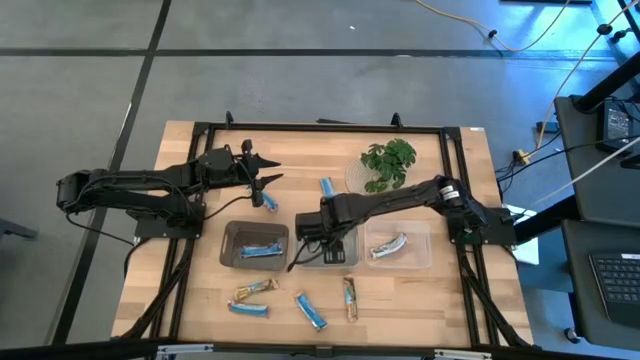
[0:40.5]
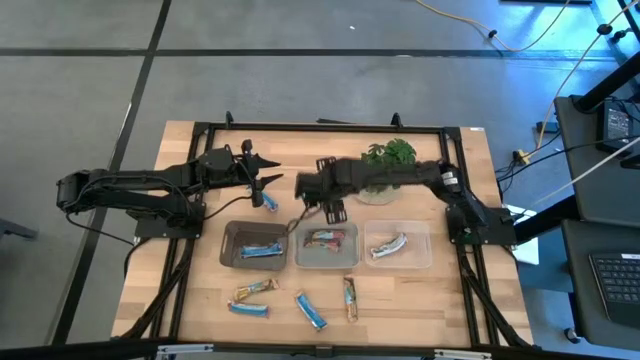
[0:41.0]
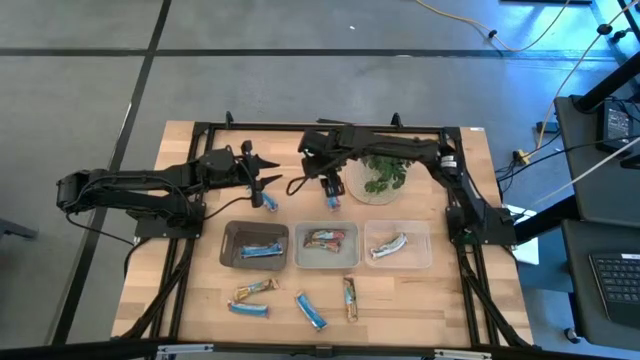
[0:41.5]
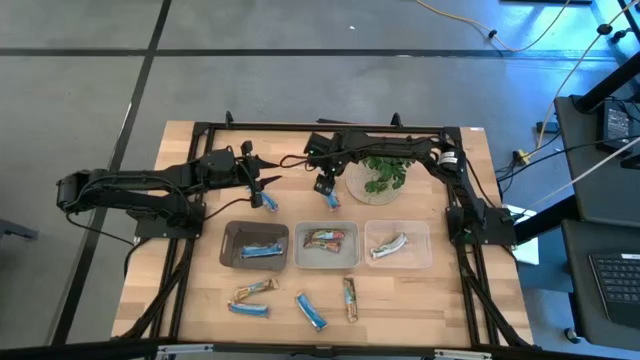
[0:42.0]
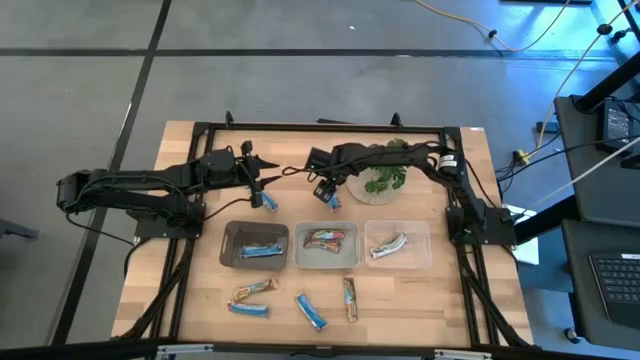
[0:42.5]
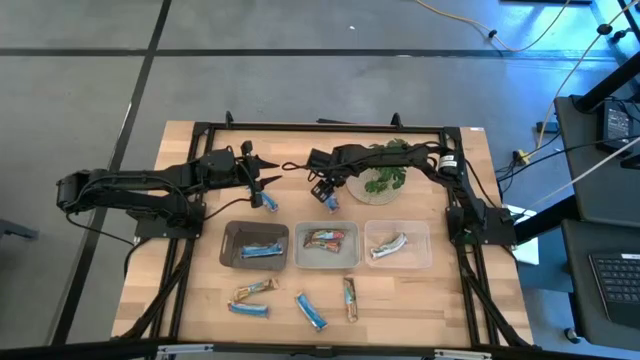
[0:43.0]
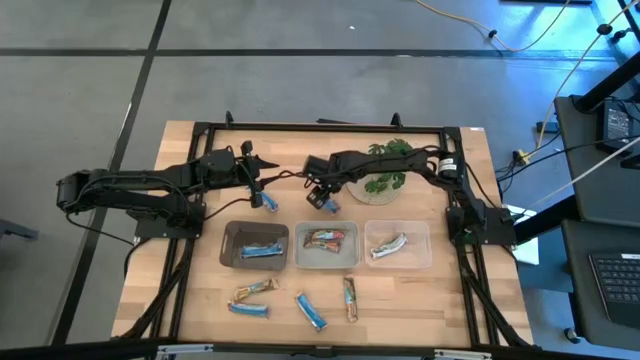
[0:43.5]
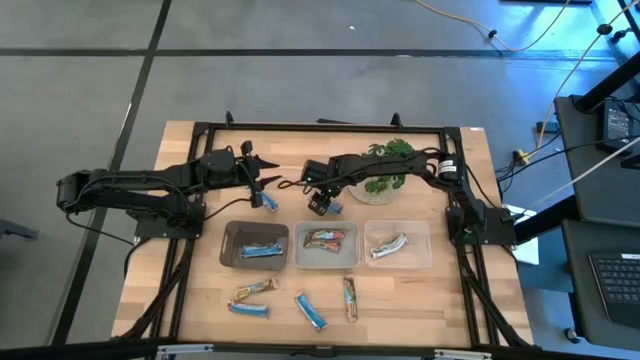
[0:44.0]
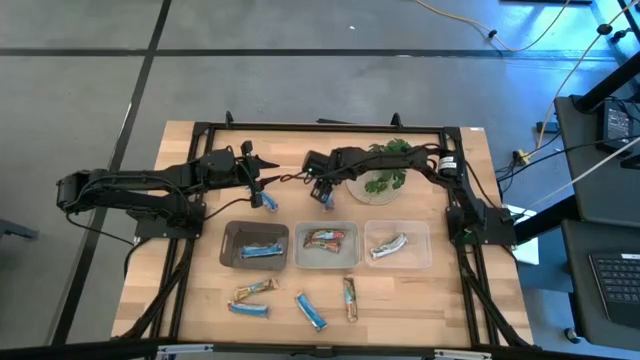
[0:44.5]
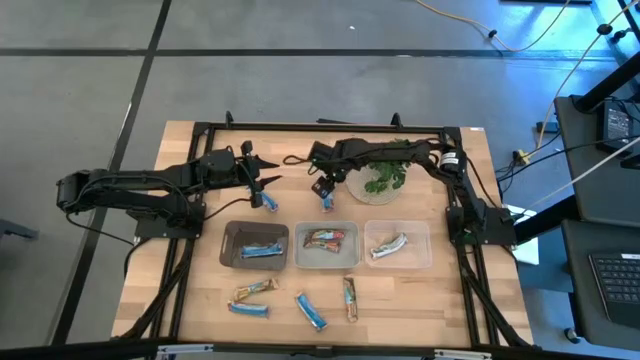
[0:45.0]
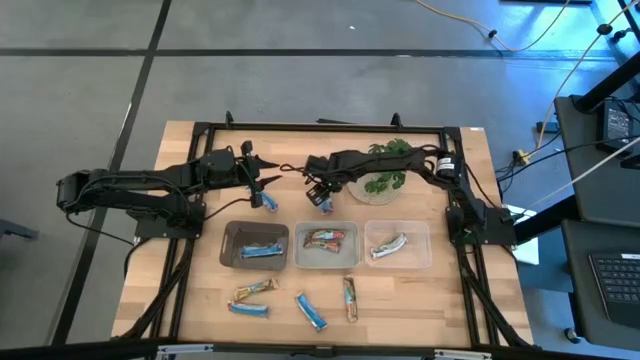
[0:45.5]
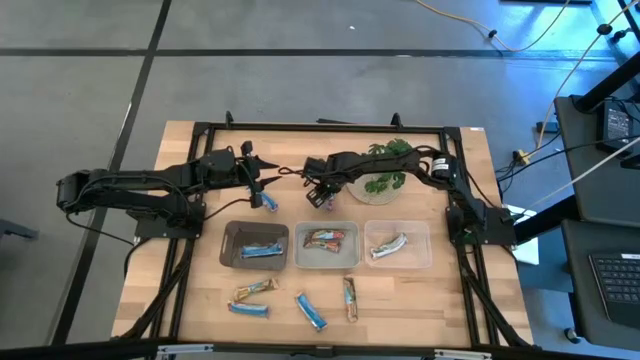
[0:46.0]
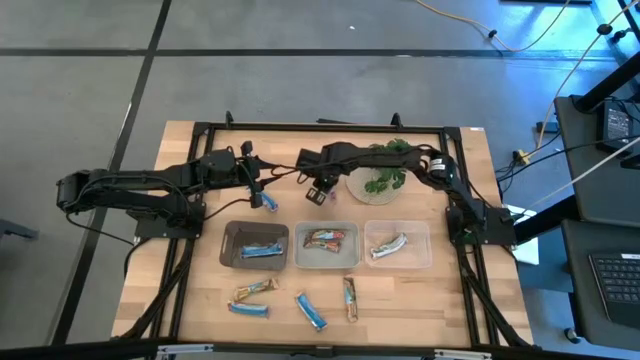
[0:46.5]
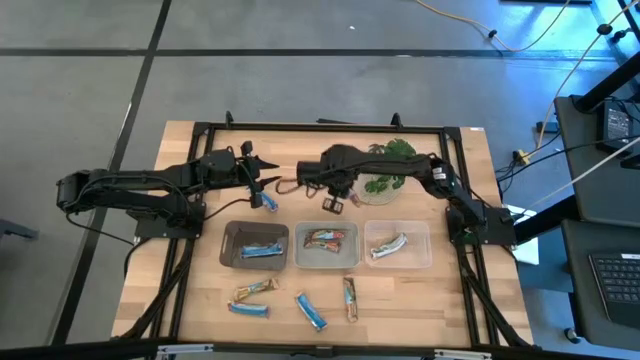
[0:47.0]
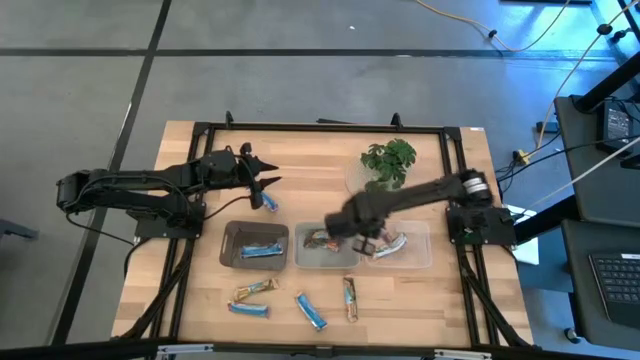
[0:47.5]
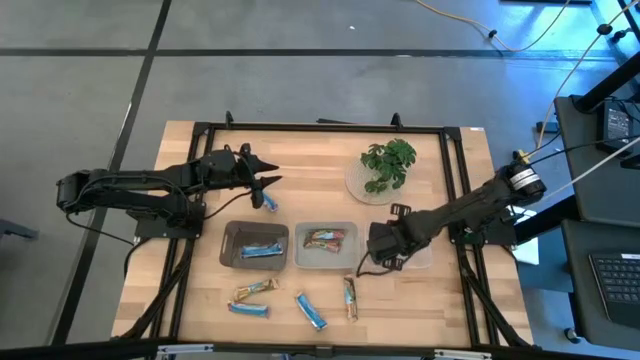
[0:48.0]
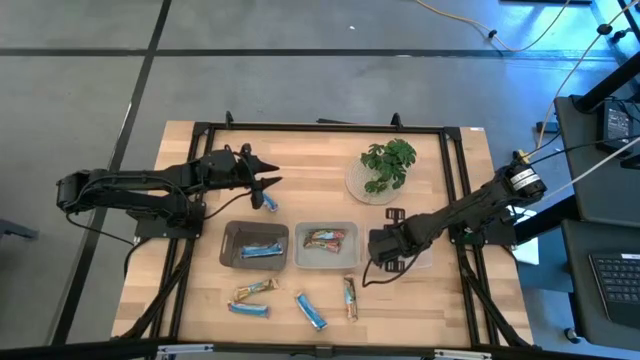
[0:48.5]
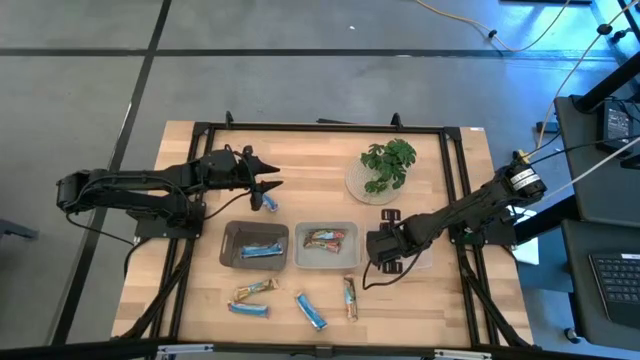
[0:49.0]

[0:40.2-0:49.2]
Task: Pick and place Granola Bars by type
Put the orange granola bar into the transparent bin

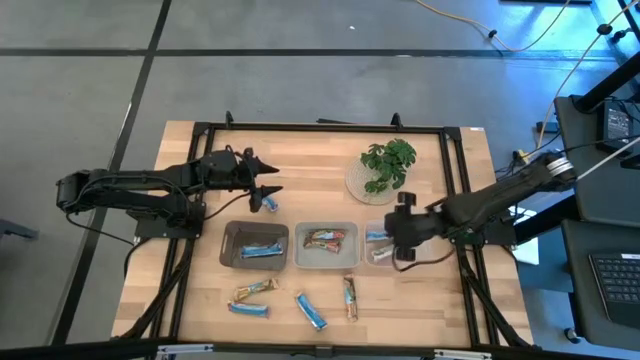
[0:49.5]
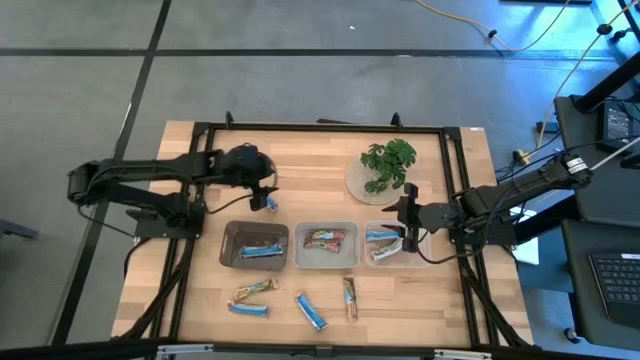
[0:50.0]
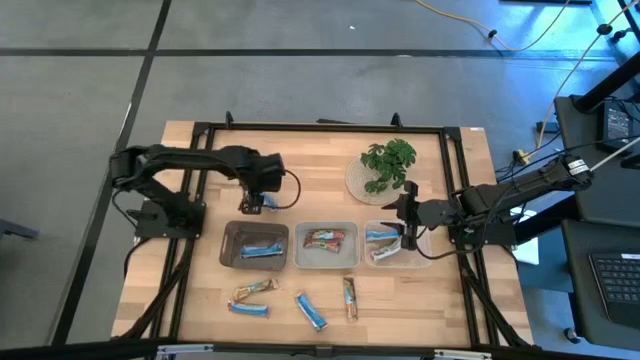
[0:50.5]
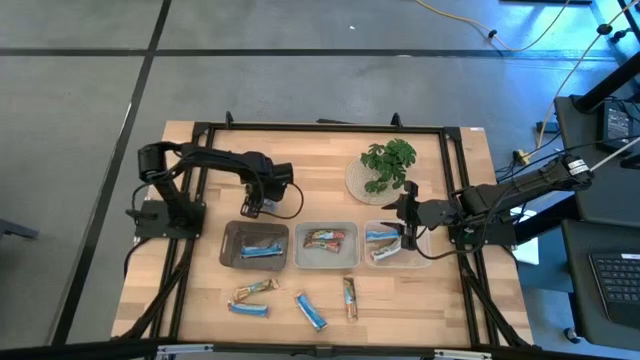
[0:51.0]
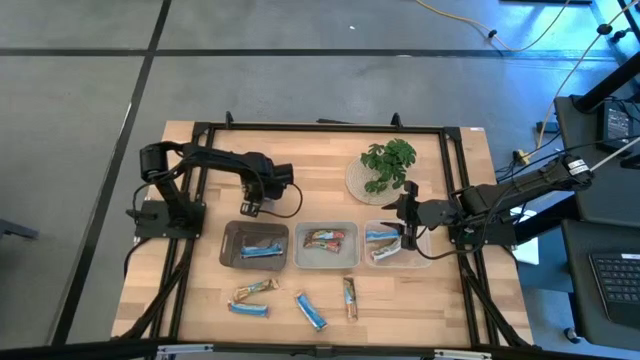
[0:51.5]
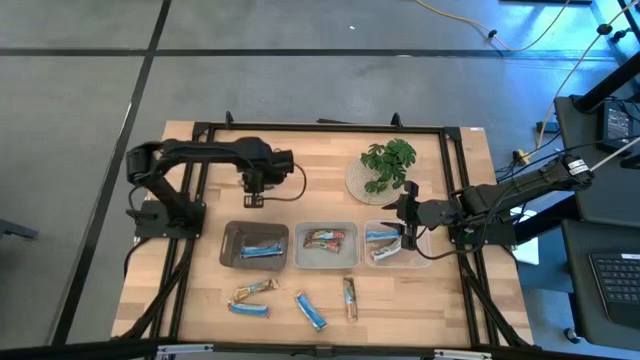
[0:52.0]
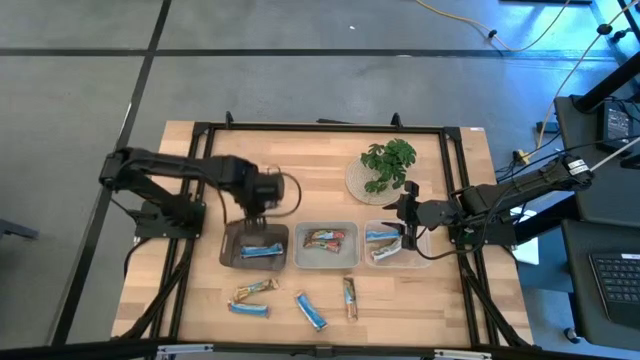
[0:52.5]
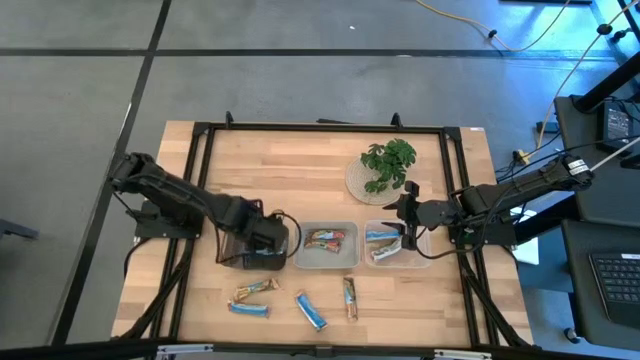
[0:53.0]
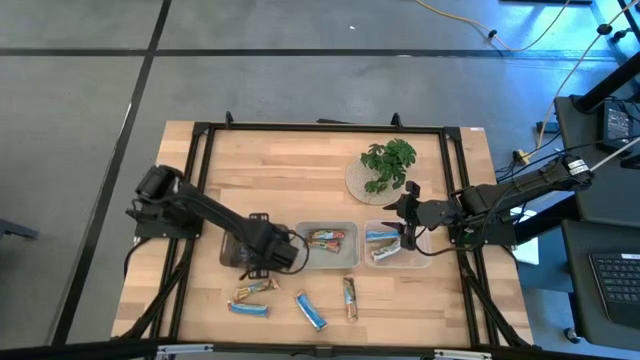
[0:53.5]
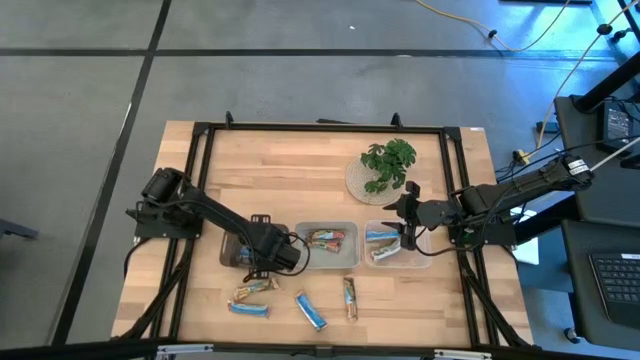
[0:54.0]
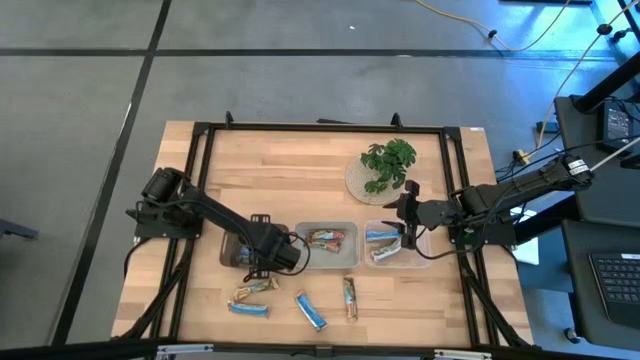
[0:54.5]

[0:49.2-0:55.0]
Put the blue granola bar into the black bin

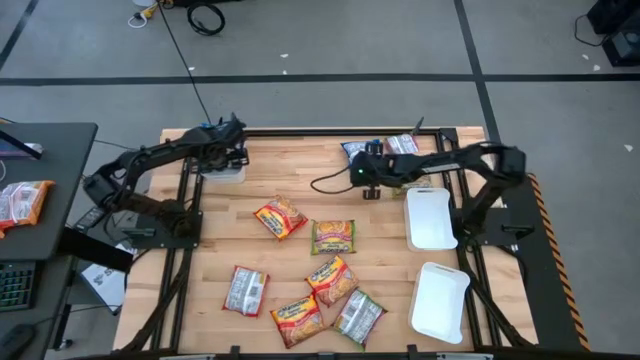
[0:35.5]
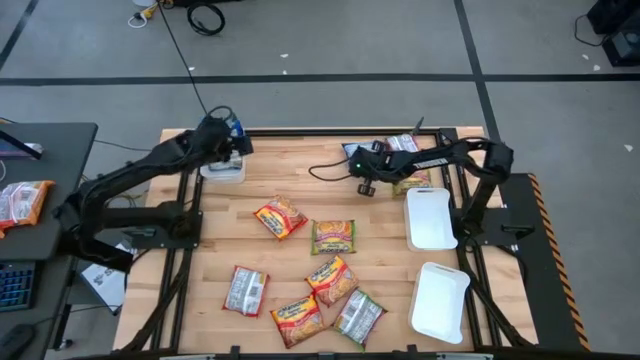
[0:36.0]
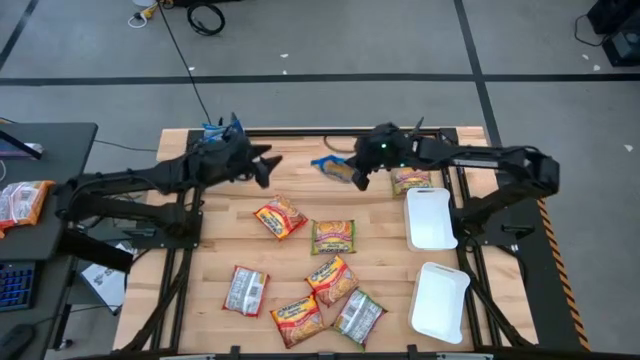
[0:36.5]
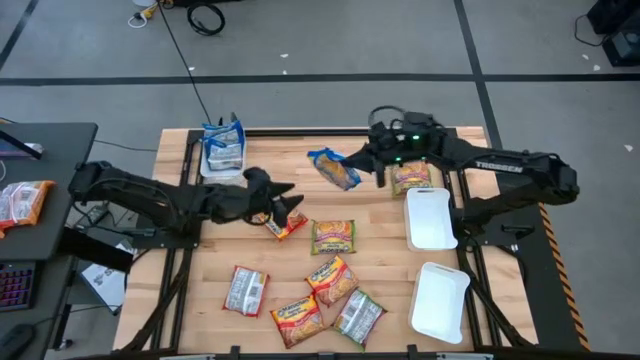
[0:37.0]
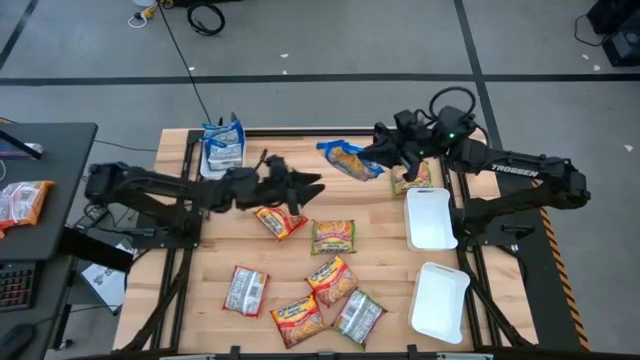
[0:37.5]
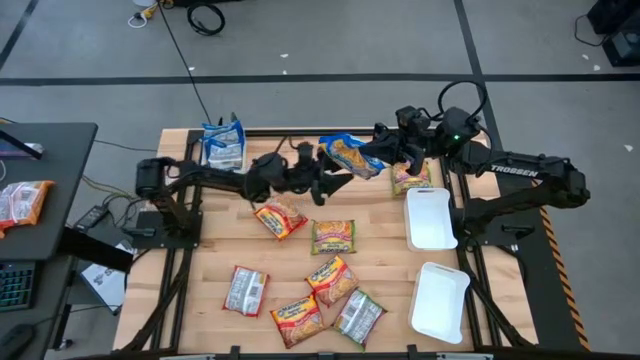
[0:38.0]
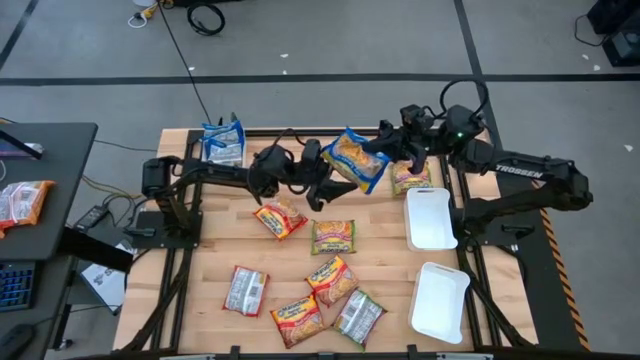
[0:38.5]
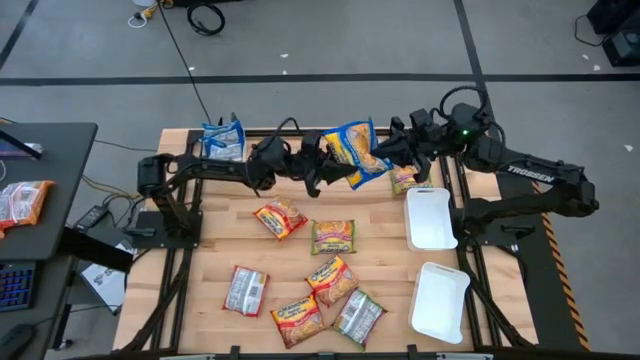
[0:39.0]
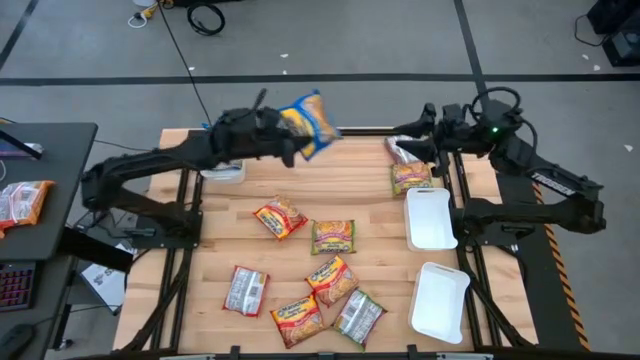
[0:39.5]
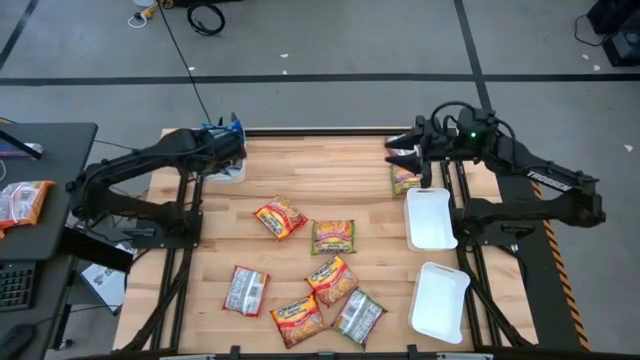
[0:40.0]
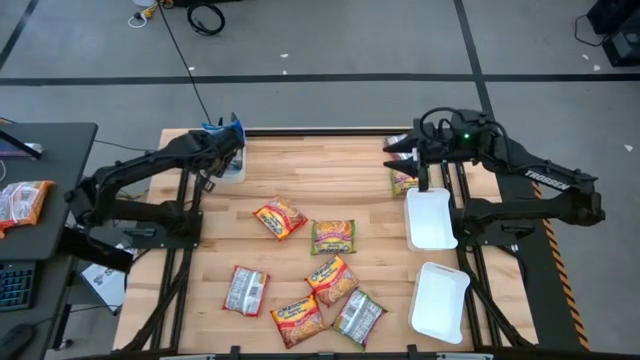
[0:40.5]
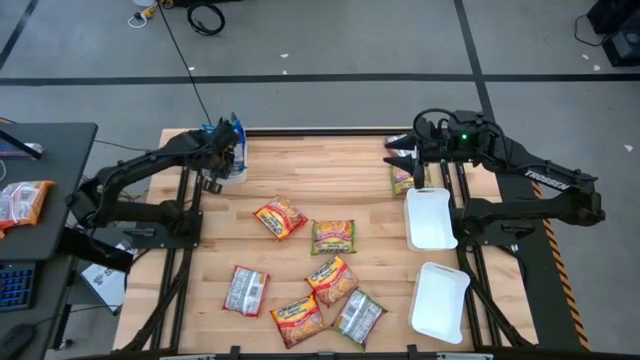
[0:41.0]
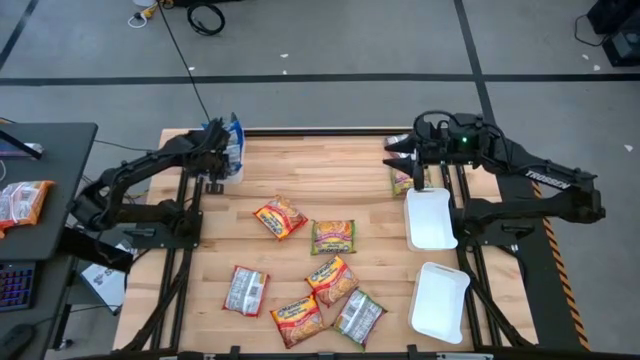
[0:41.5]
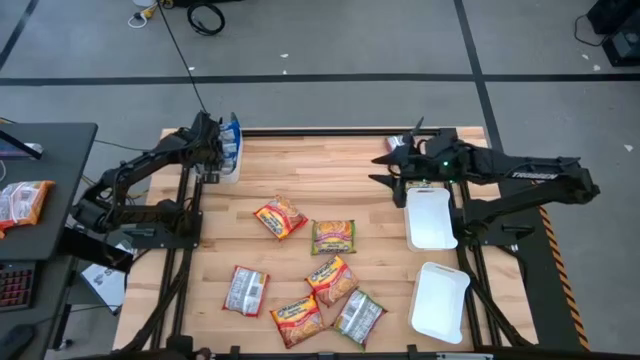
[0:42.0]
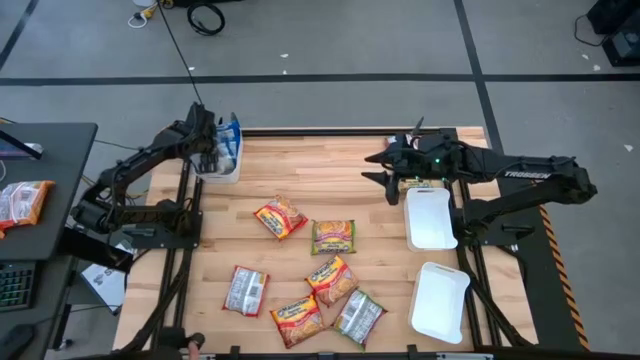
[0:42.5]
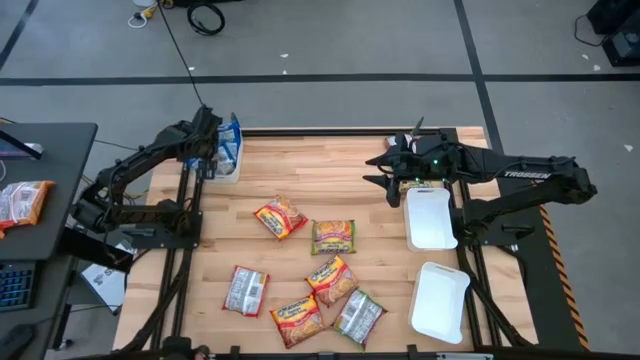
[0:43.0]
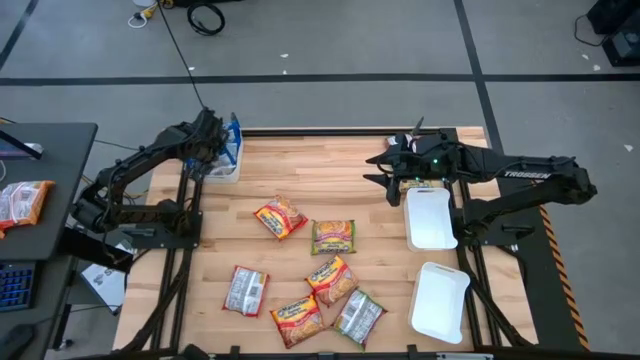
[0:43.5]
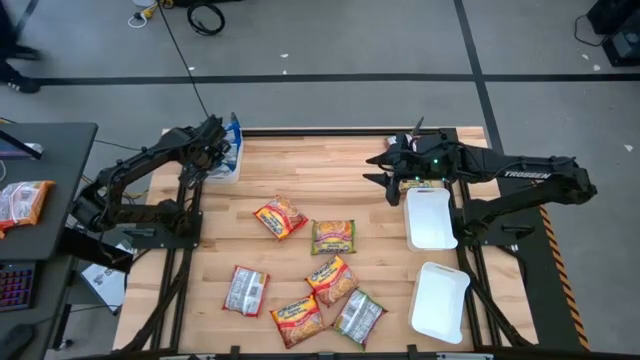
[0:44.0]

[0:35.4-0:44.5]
Task: Sort Maruchan noodles
Put the blue noodle pack into the top left white bin
